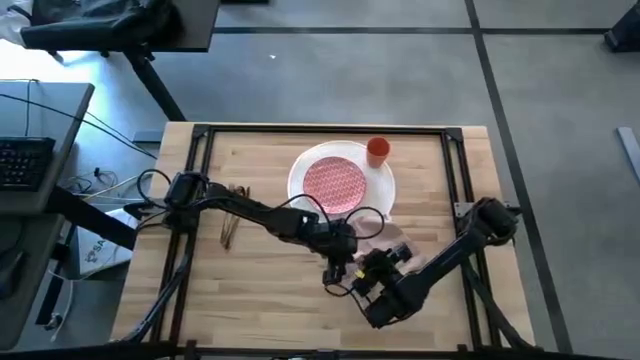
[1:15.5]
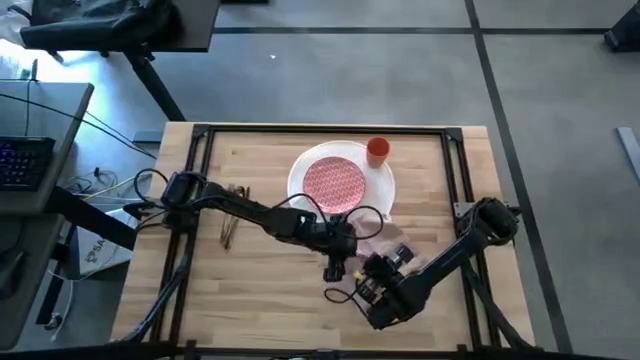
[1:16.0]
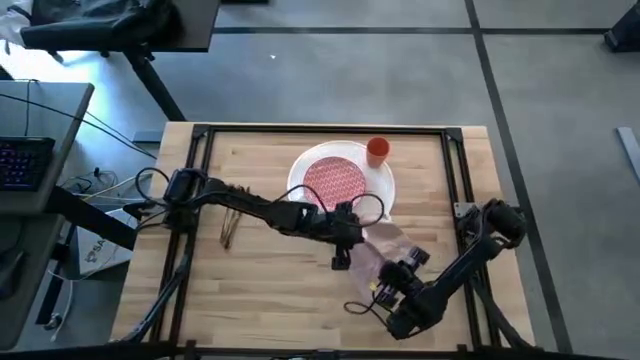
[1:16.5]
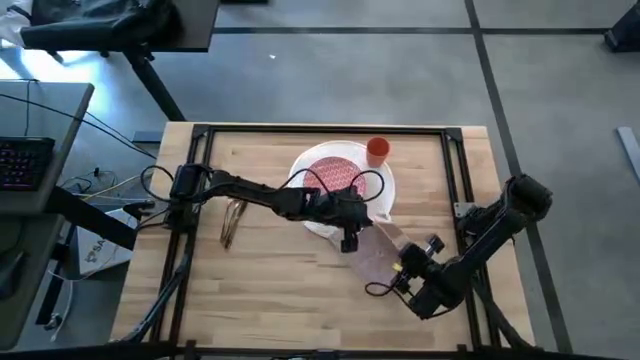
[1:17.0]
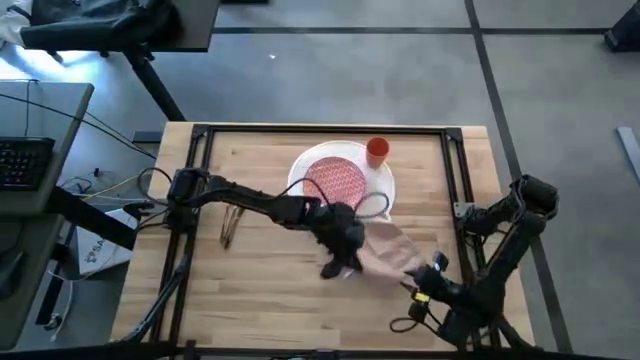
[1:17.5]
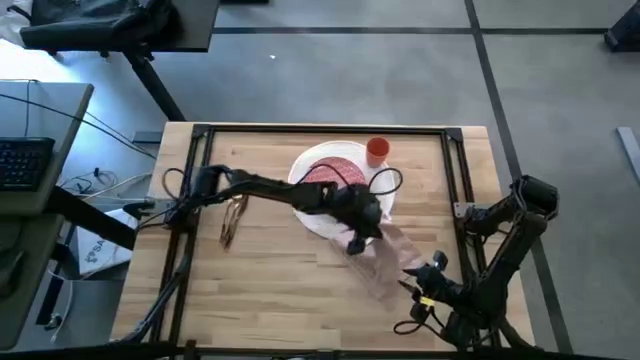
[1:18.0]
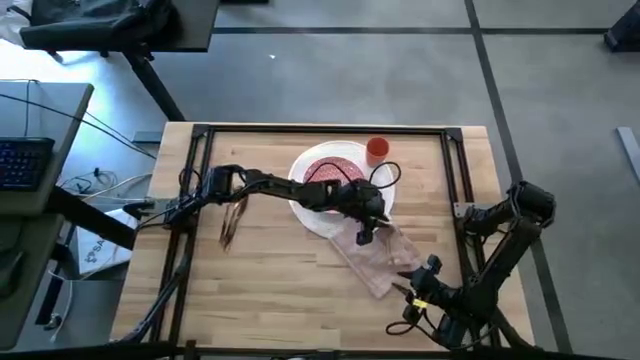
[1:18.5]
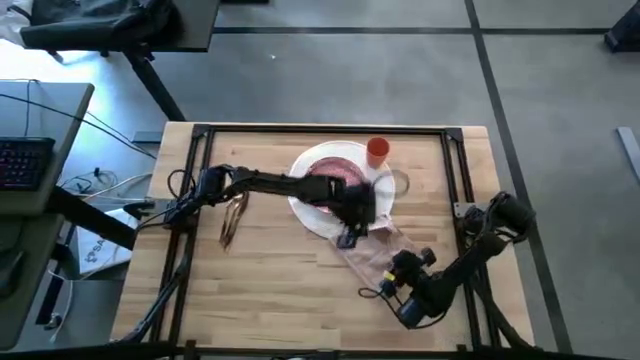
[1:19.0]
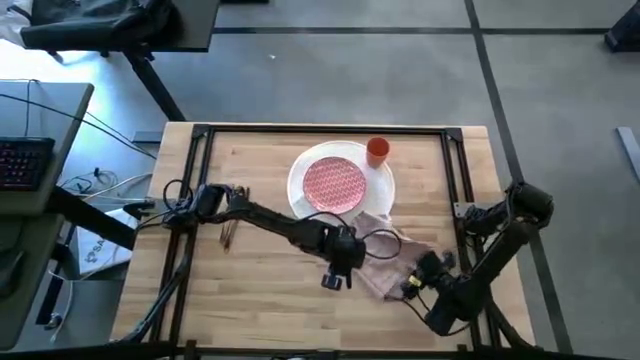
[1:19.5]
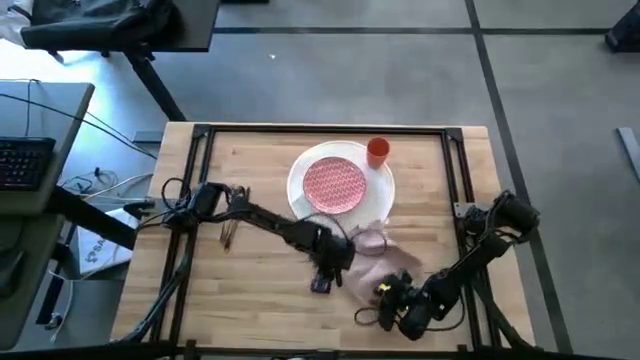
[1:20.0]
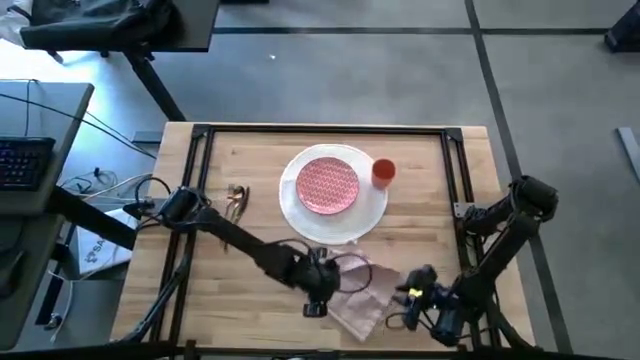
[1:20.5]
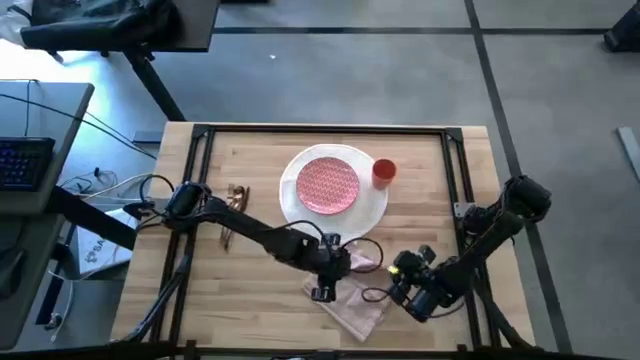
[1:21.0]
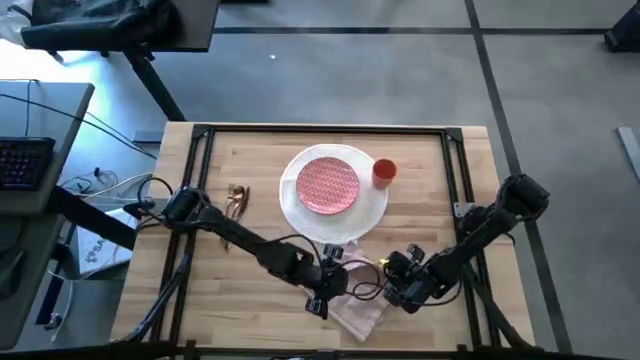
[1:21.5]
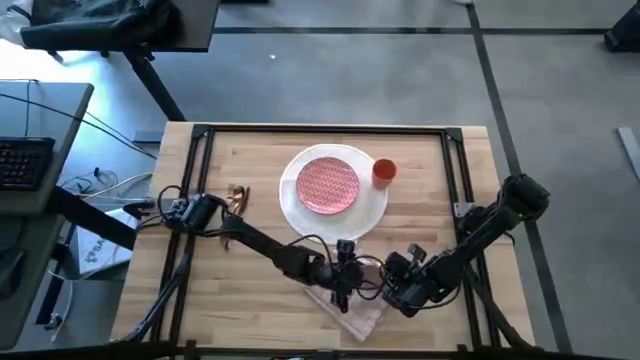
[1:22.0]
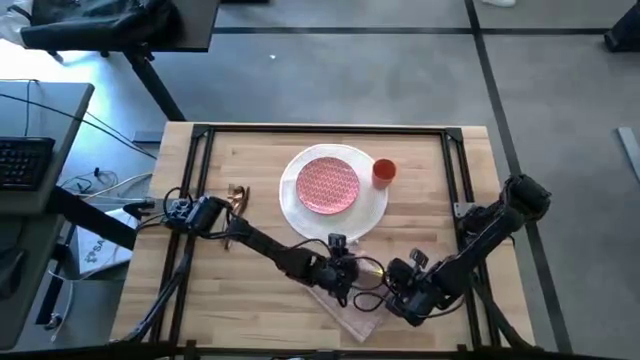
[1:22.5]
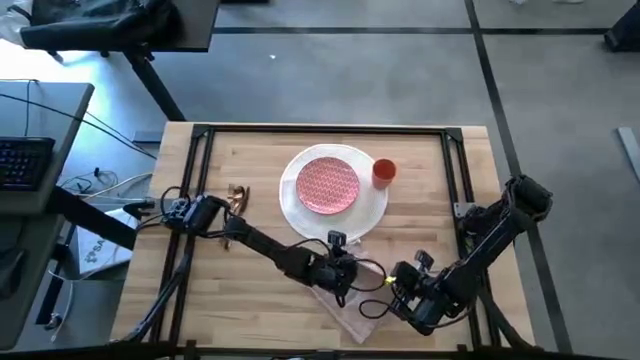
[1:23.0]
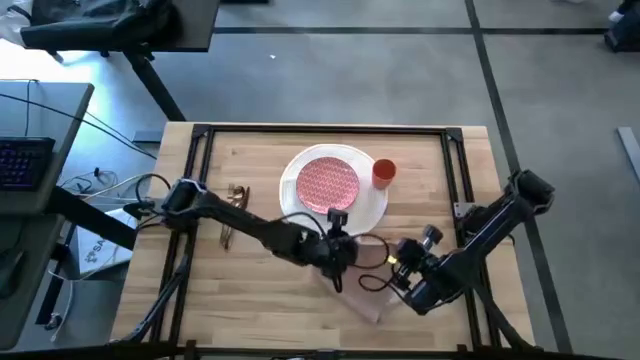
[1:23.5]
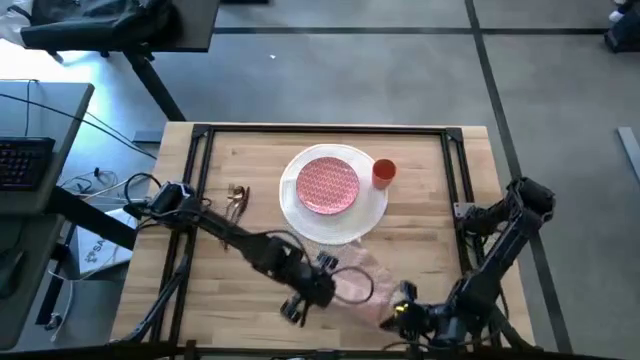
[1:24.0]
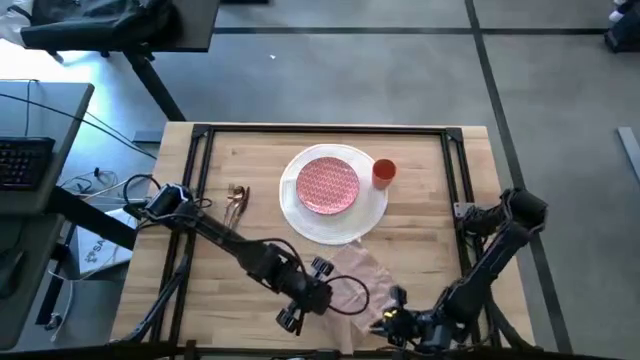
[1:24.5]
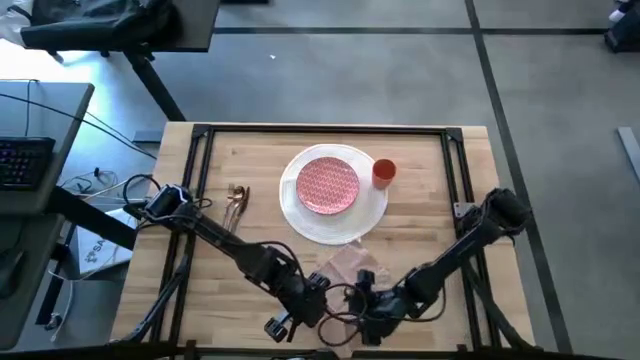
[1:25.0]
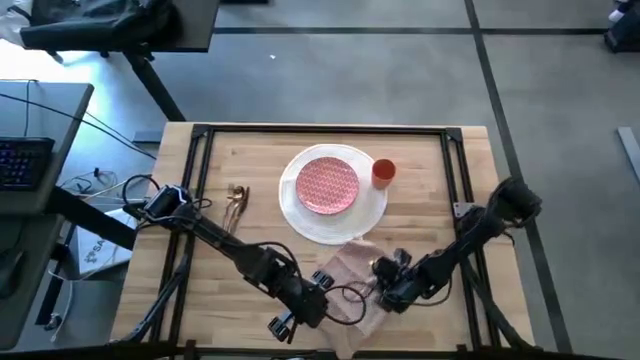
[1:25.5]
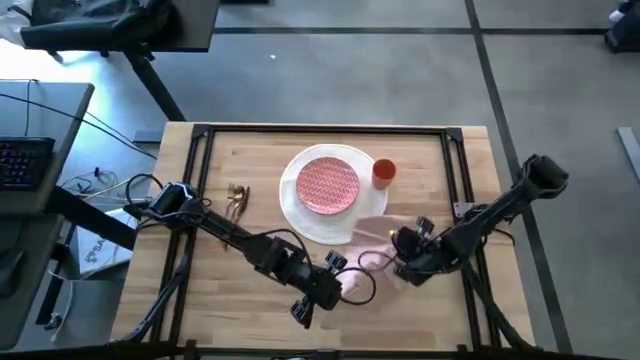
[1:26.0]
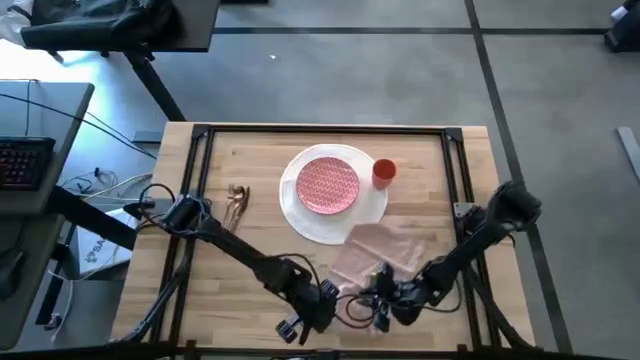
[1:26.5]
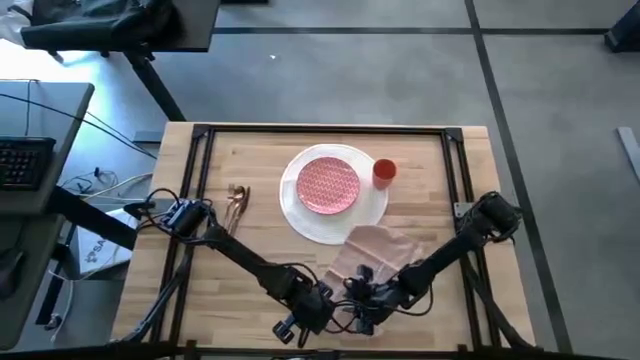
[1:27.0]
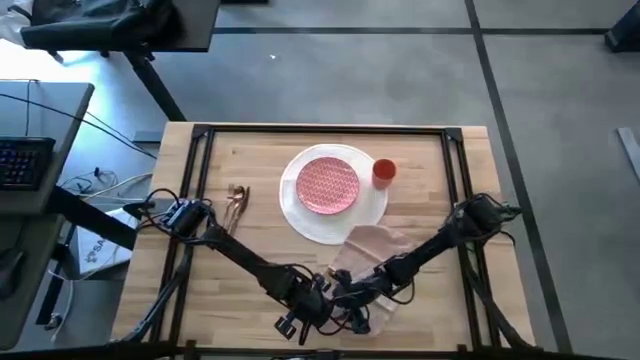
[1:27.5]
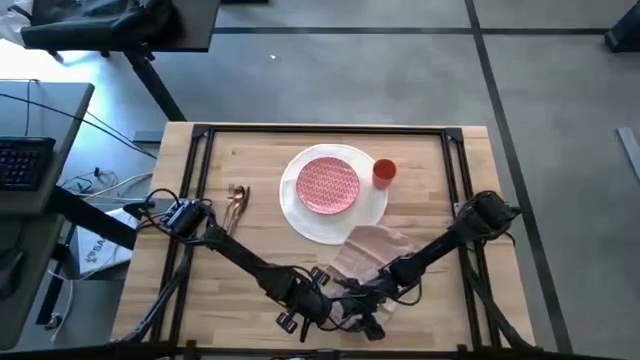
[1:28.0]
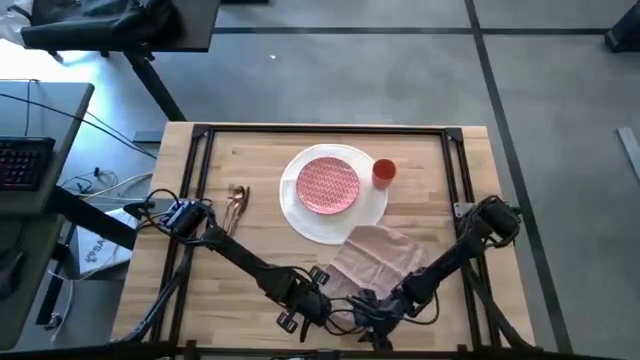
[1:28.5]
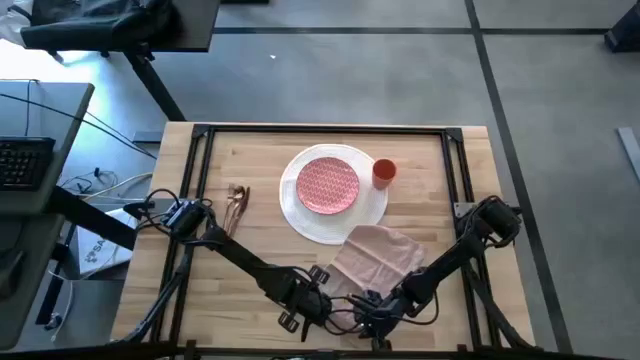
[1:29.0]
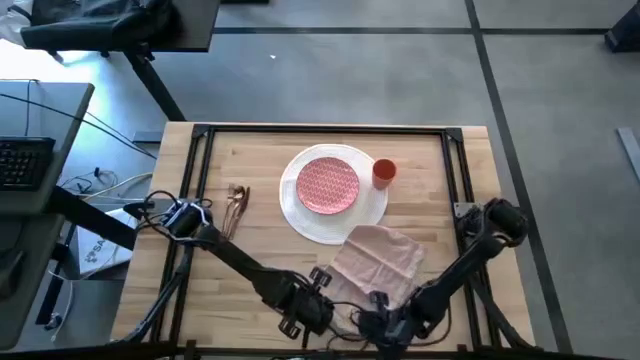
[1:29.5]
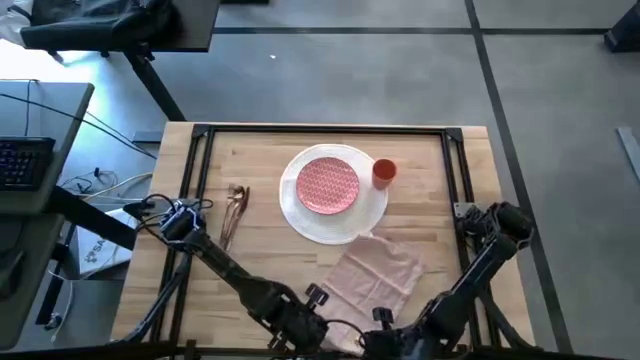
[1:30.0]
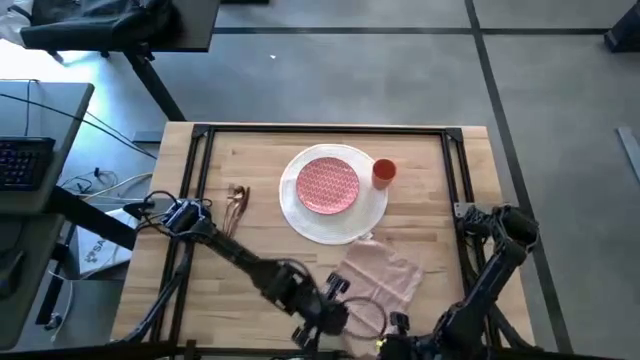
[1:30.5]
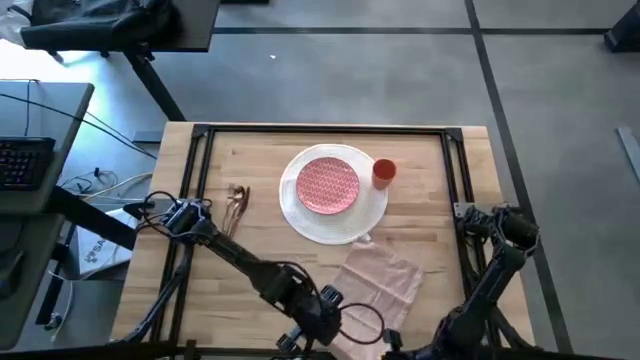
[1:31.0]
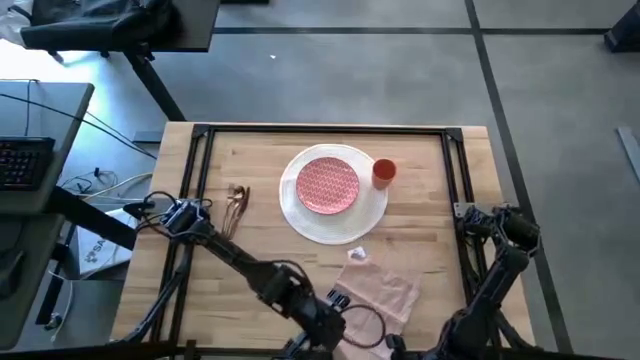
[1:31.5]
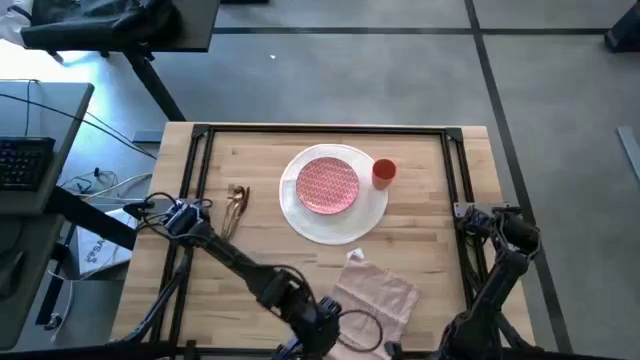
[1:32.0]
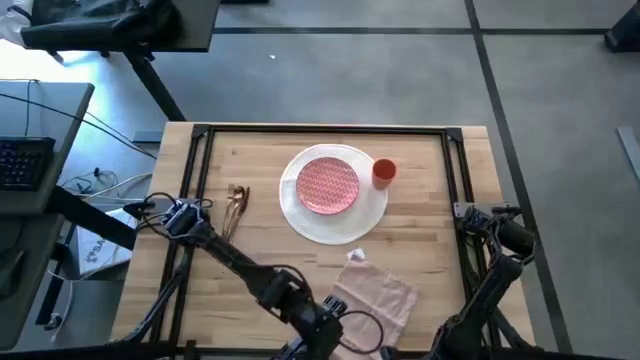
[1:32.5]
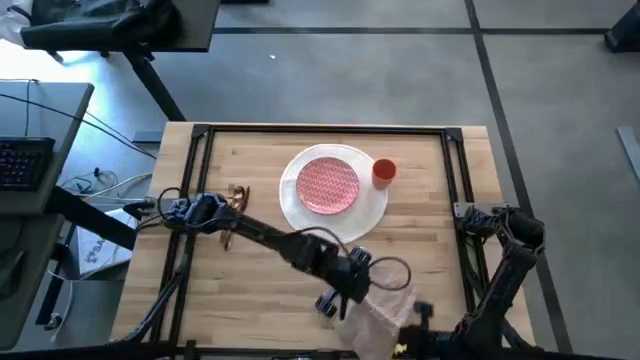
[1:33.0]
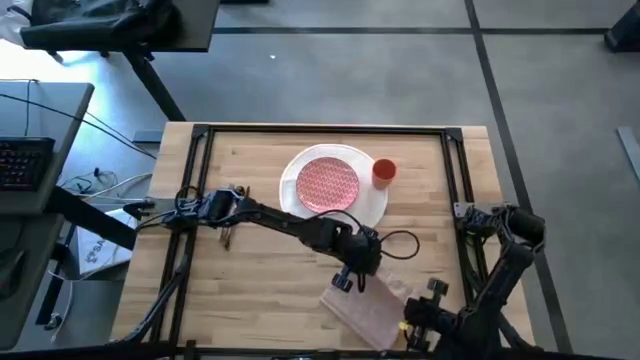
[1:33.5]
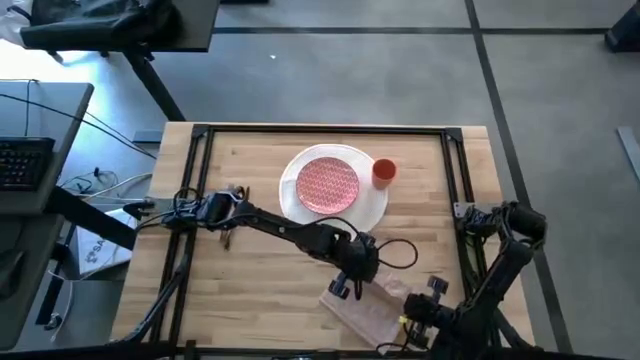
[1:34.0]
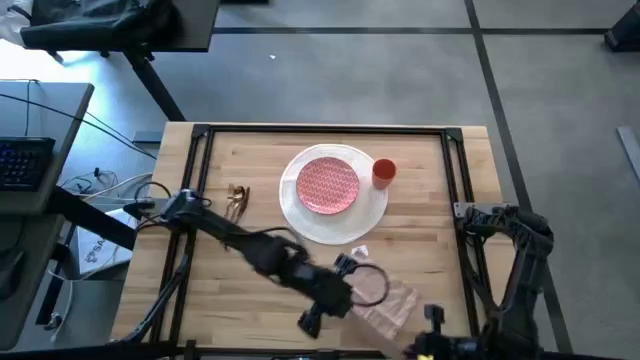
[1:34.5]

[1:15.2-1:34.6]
Task: Set table place
Fold the napkin

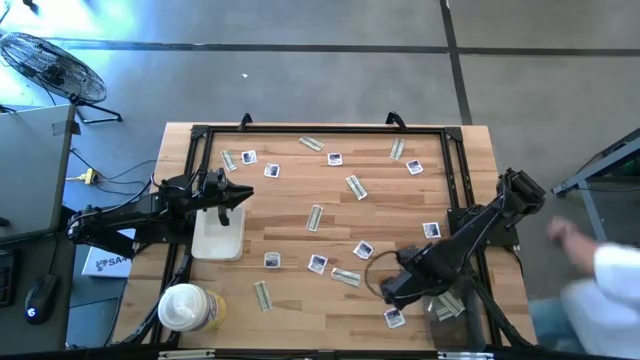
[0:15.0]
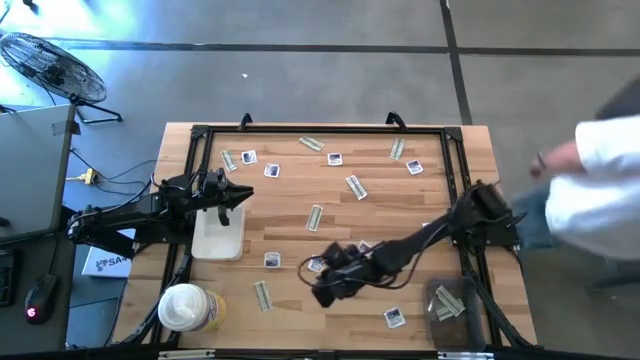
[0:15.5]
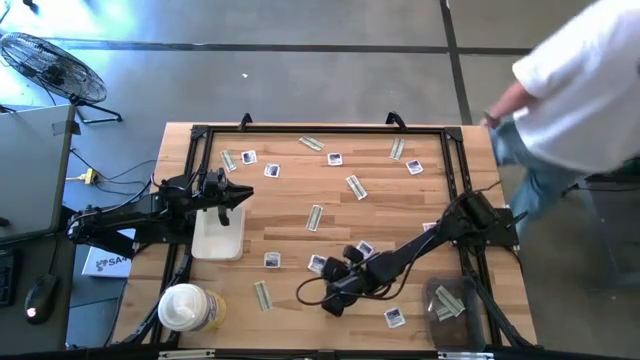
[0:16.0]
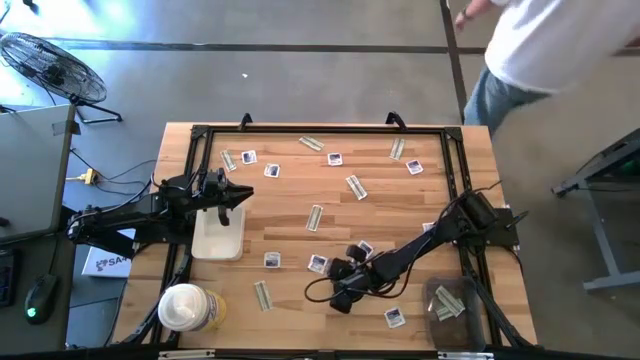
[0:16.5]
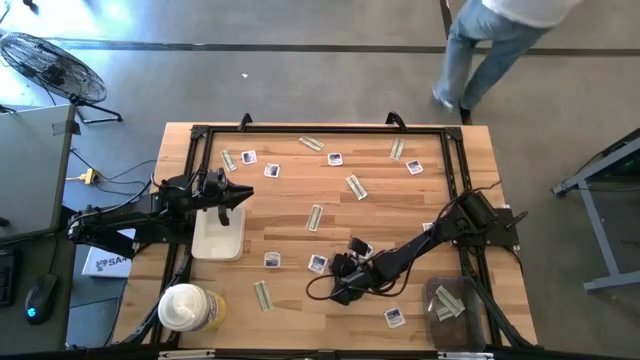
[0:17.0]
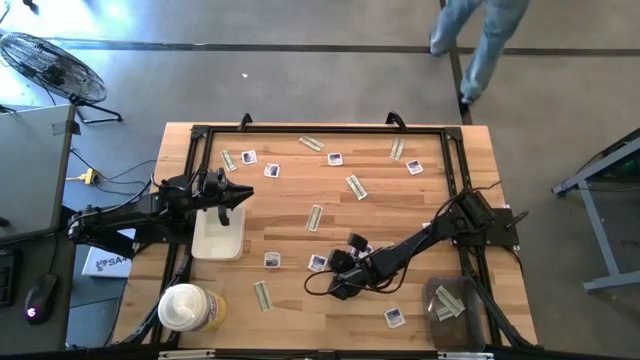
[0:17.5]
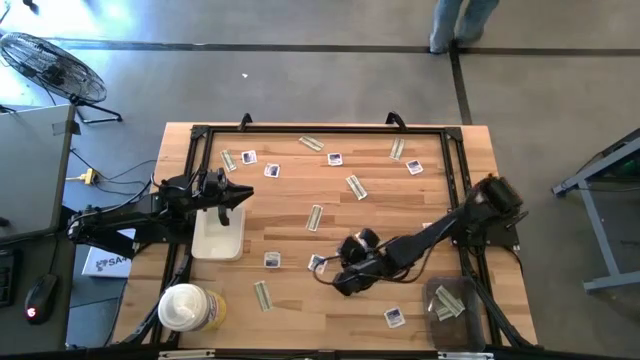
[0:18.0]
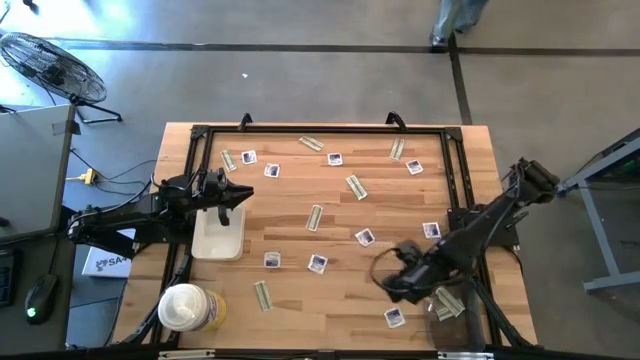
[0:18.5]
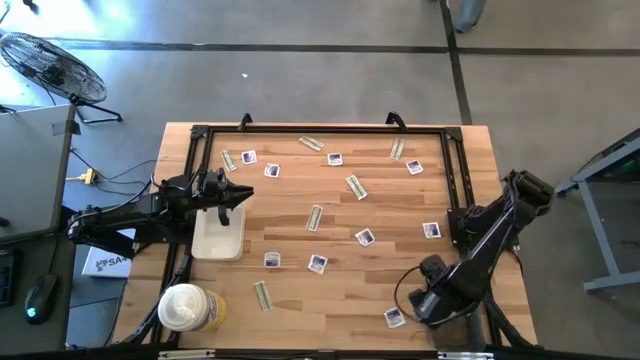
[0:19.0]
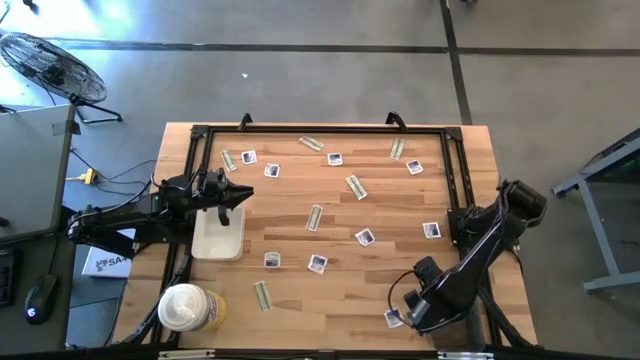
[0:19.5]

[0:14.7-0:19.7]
Task: Pick & Place First Aid Supplies
Put the green bandage pack into the black bin
